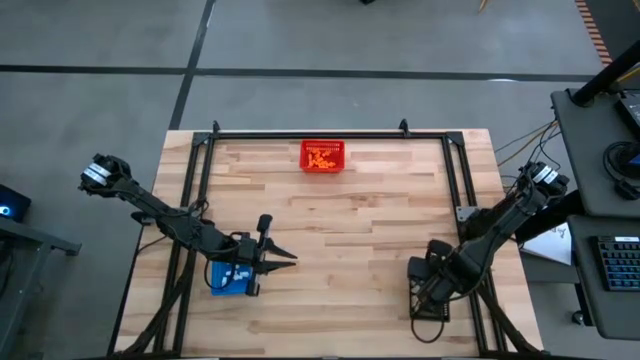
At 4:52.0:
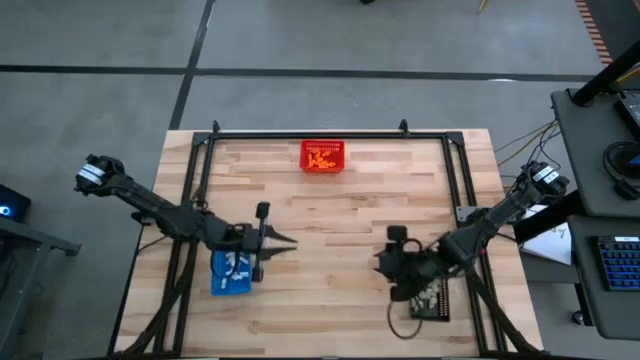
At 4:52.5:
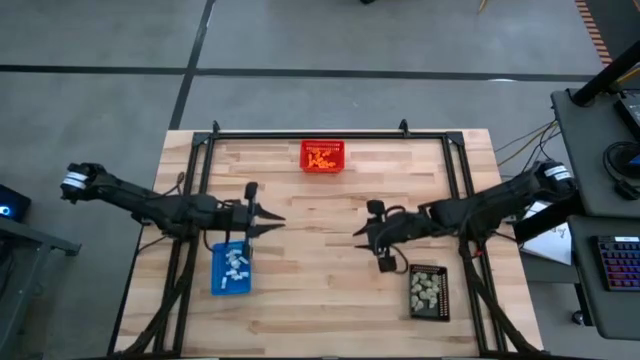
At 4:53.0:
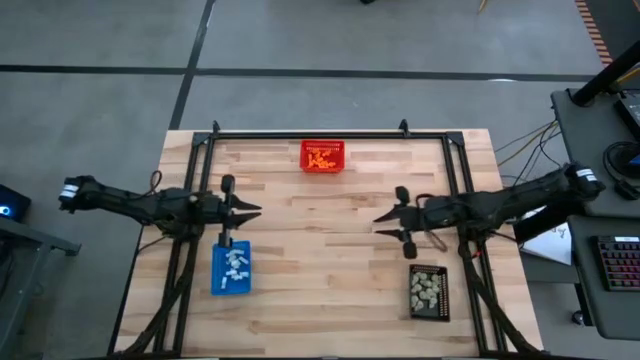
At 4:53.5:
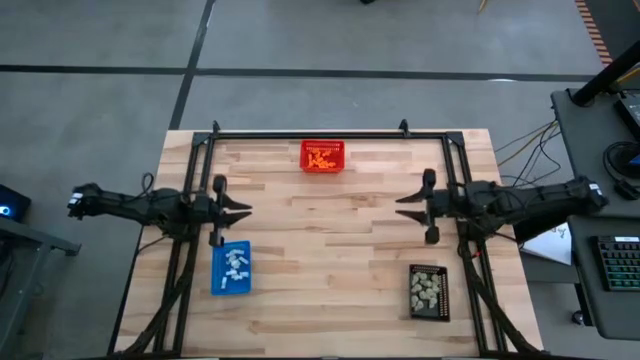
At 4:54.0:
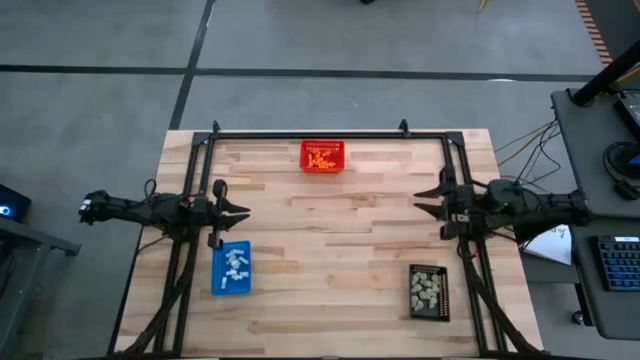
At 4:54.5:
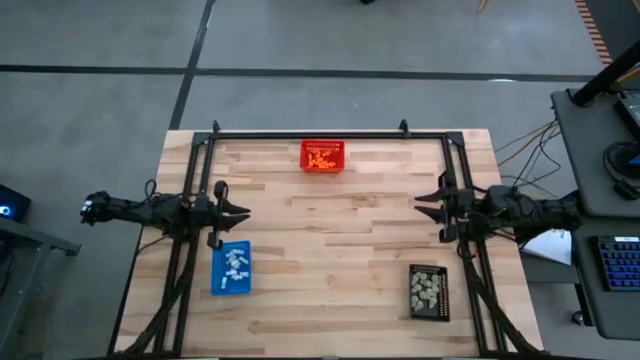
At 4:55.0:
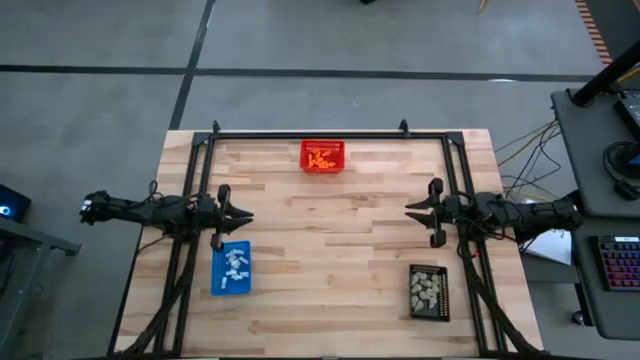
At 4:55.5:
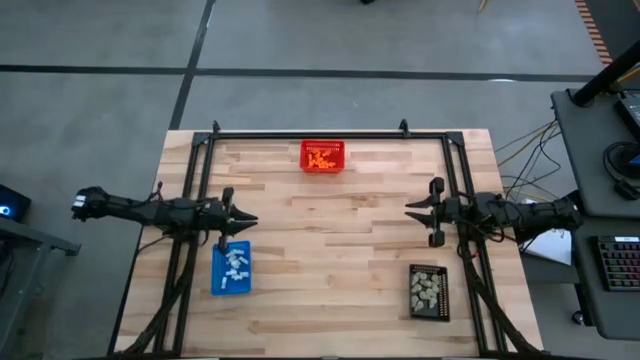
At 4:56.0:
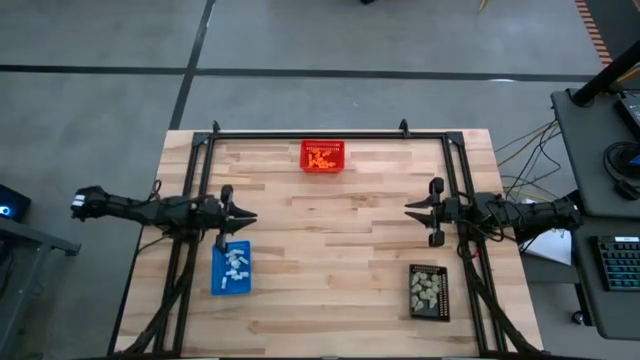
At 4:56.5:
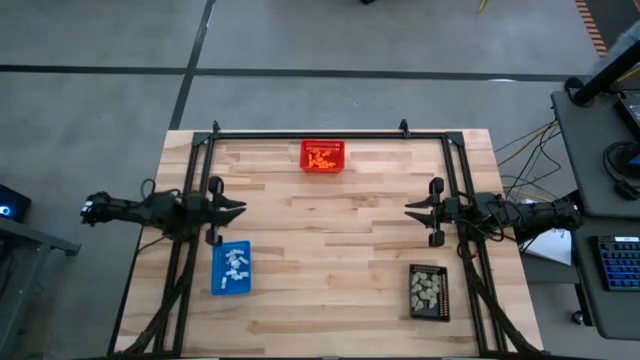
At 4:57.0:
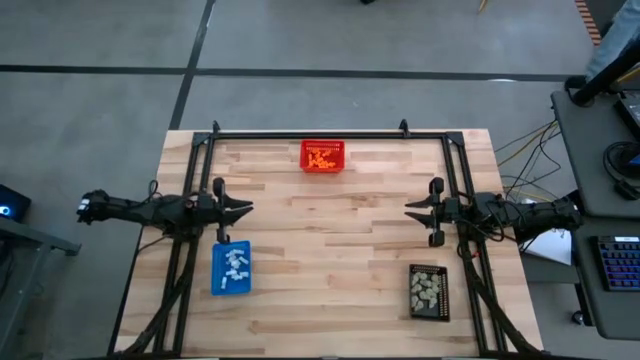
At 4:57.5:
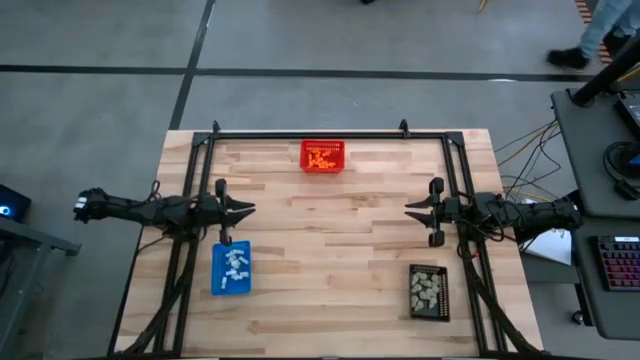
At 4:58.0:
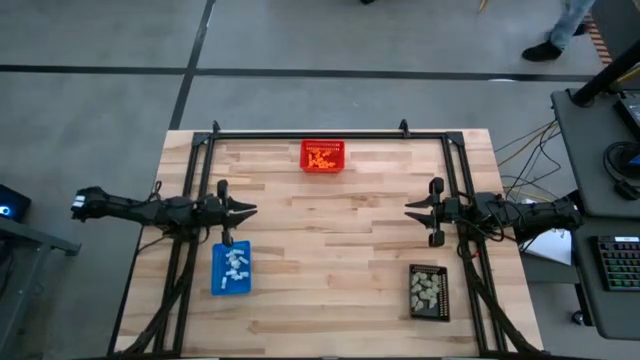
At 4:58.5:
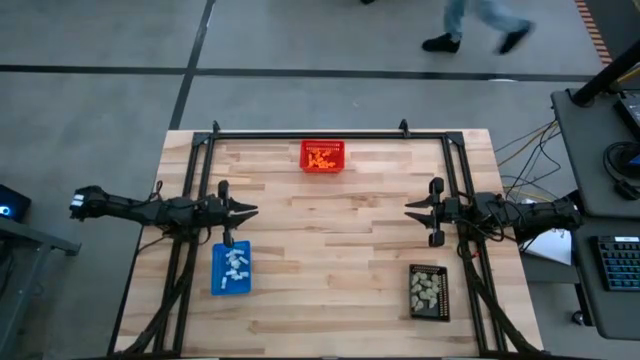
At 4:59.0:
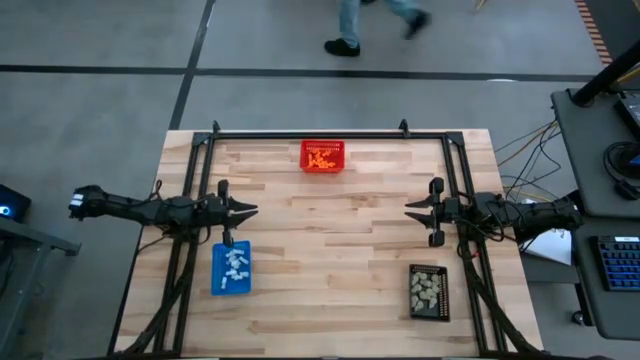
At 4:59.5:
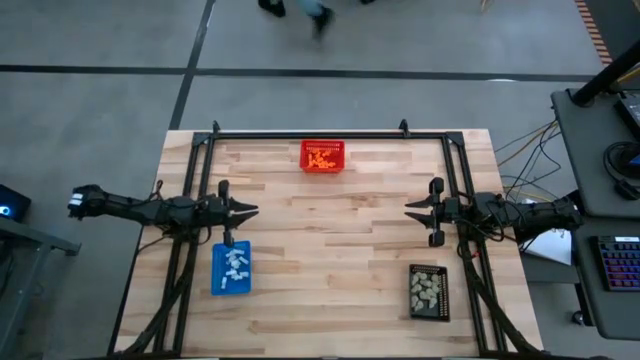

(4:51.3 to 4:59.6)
Task: Sort Halloween decoration
Return to Home Position

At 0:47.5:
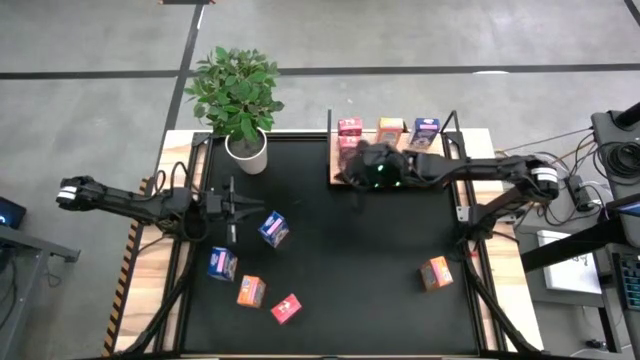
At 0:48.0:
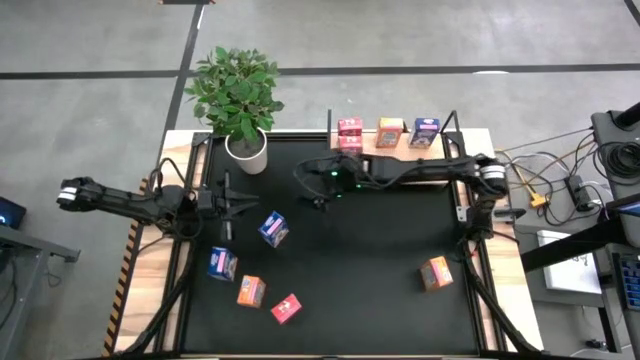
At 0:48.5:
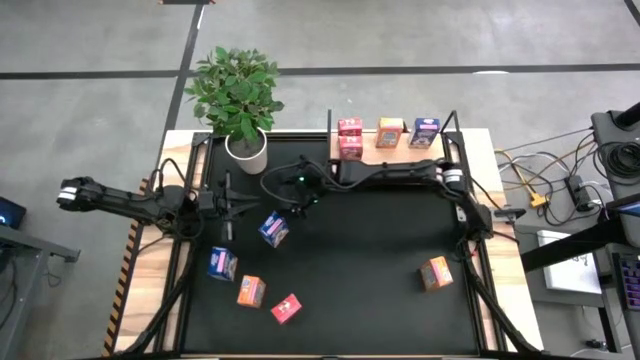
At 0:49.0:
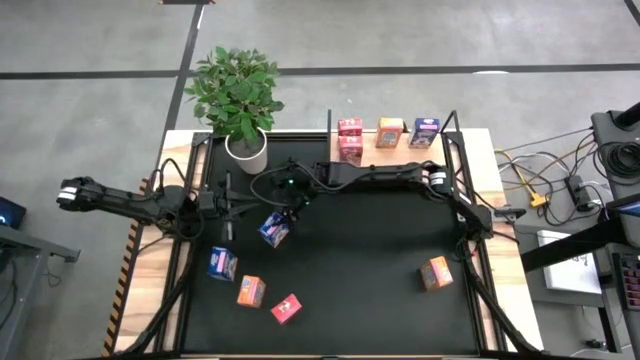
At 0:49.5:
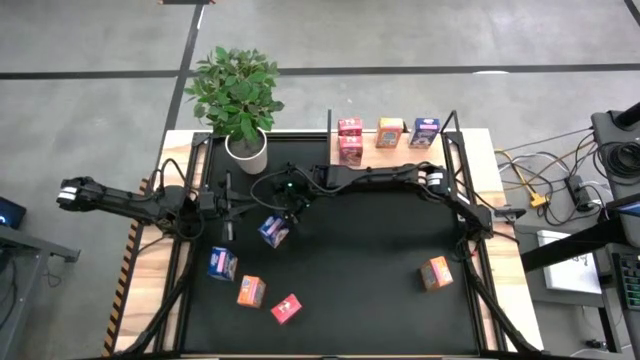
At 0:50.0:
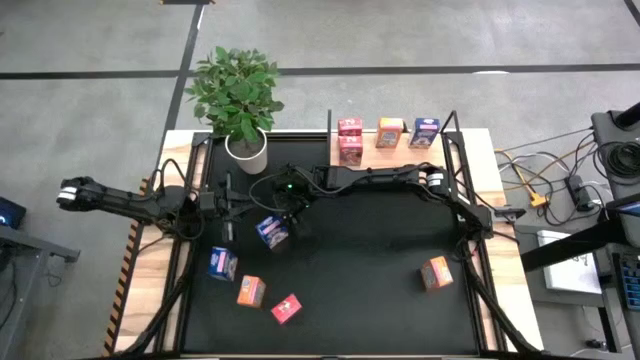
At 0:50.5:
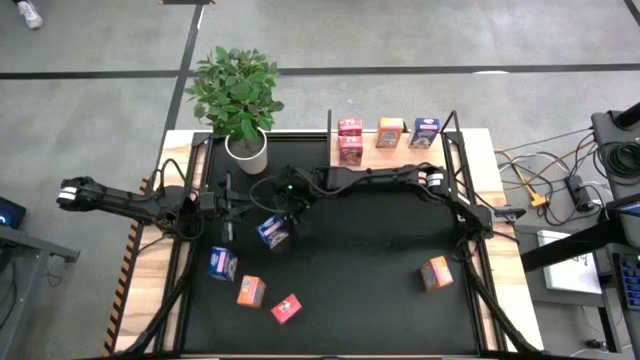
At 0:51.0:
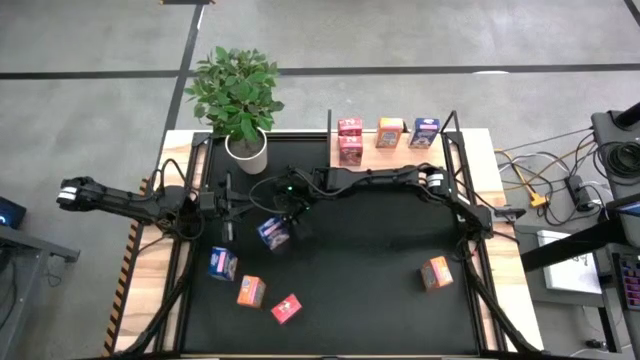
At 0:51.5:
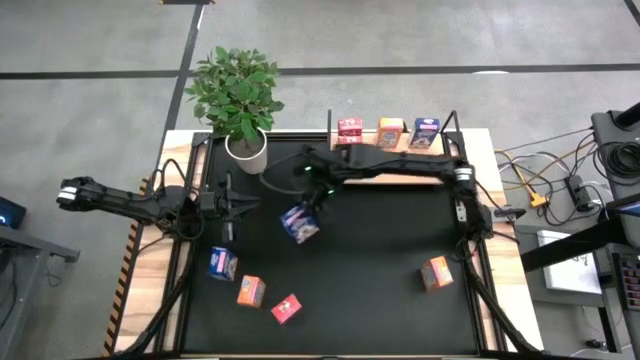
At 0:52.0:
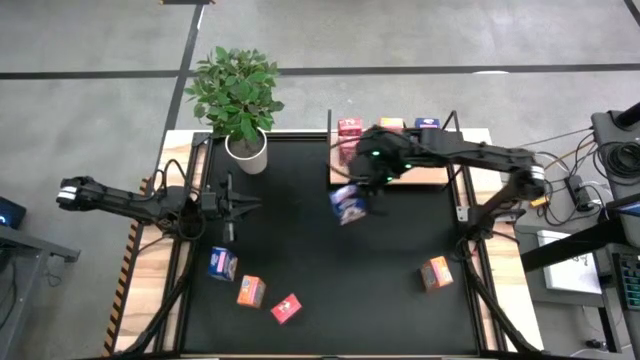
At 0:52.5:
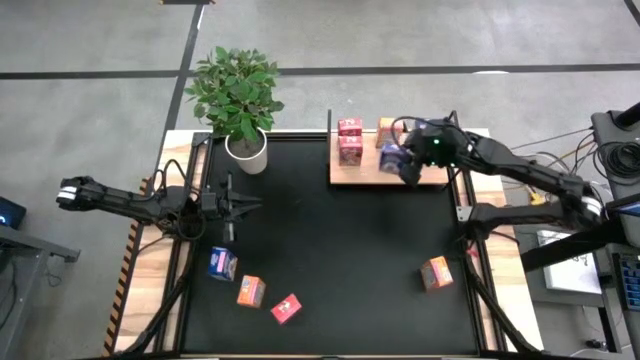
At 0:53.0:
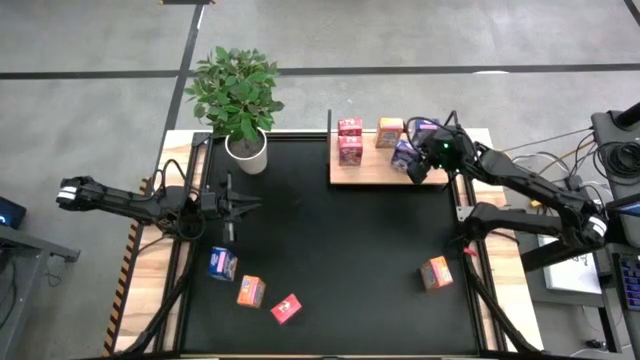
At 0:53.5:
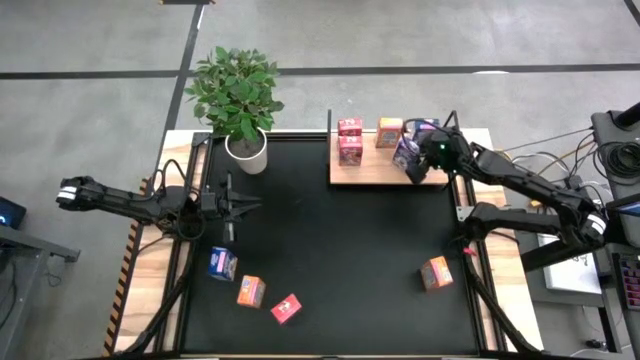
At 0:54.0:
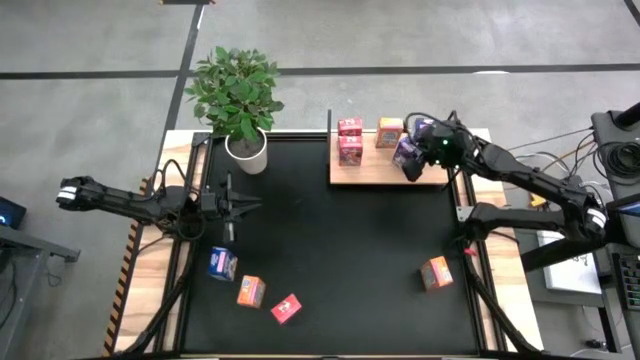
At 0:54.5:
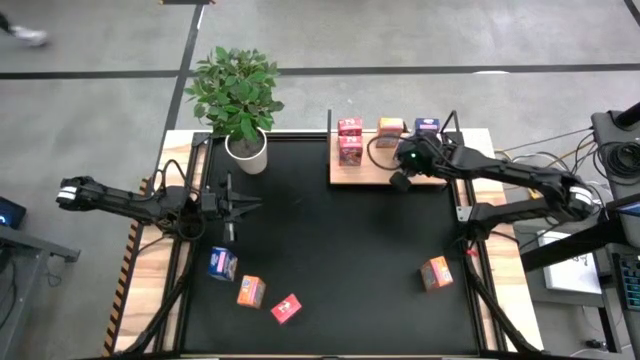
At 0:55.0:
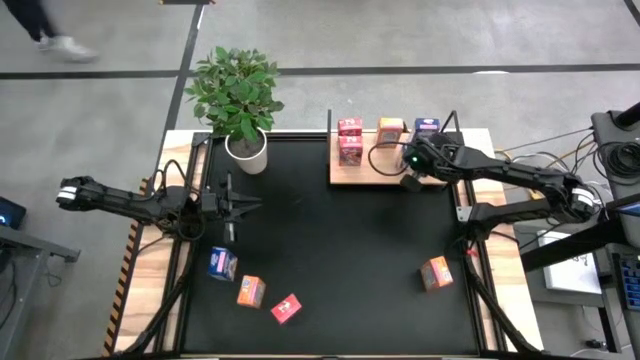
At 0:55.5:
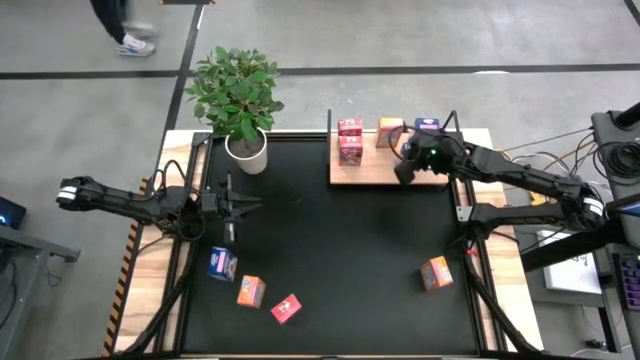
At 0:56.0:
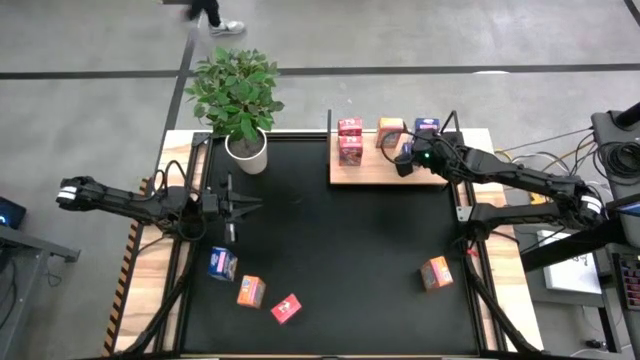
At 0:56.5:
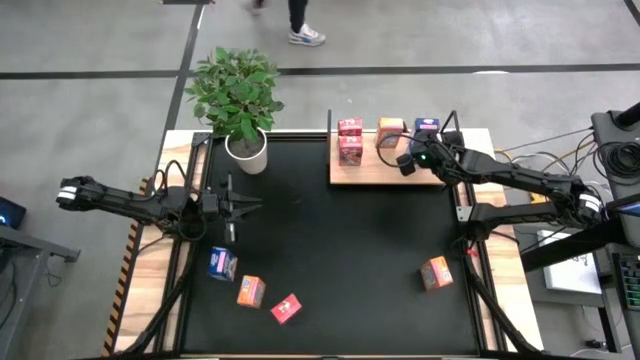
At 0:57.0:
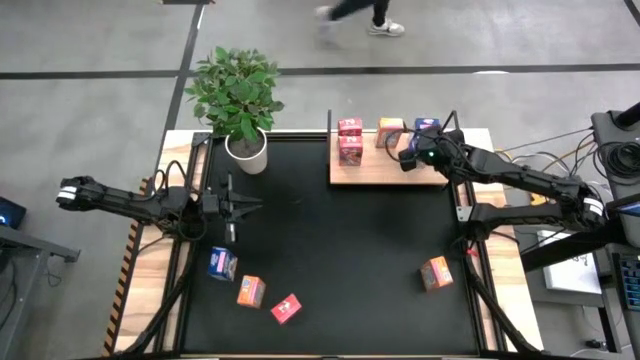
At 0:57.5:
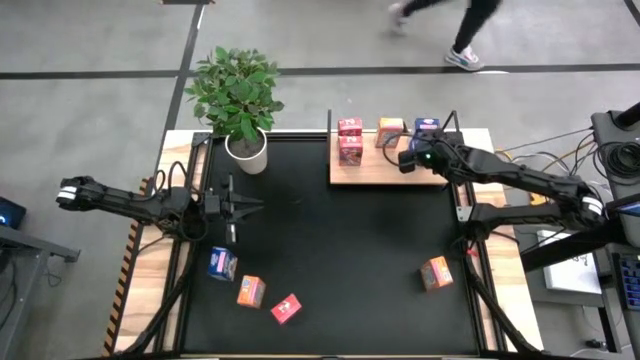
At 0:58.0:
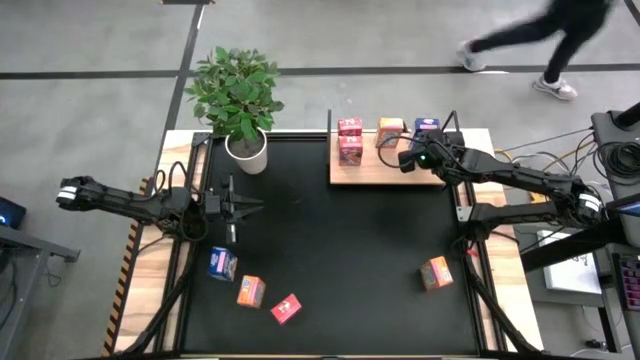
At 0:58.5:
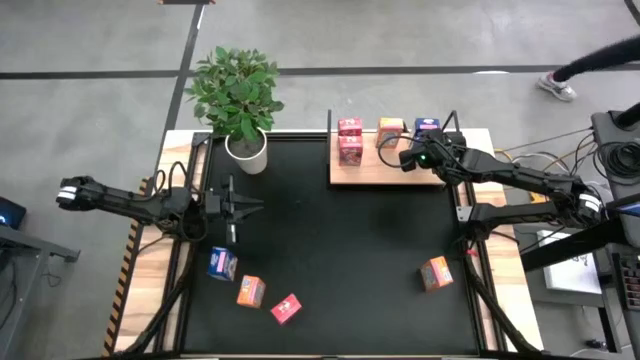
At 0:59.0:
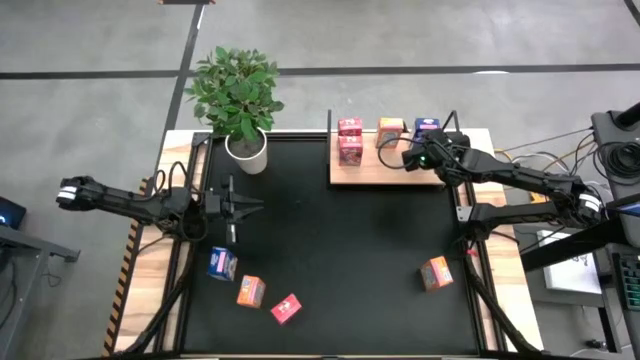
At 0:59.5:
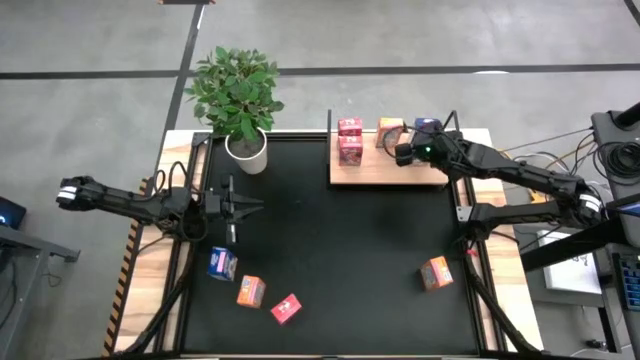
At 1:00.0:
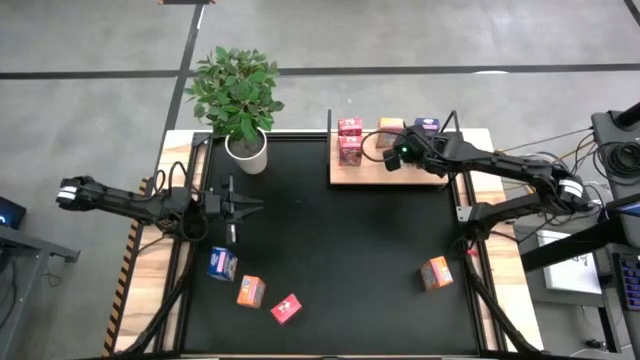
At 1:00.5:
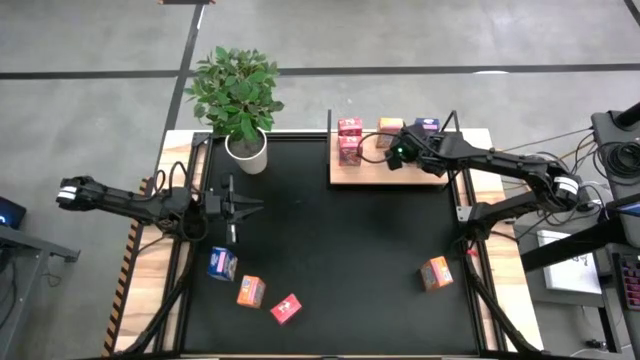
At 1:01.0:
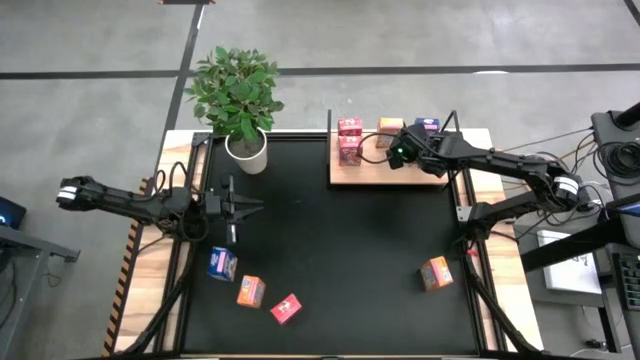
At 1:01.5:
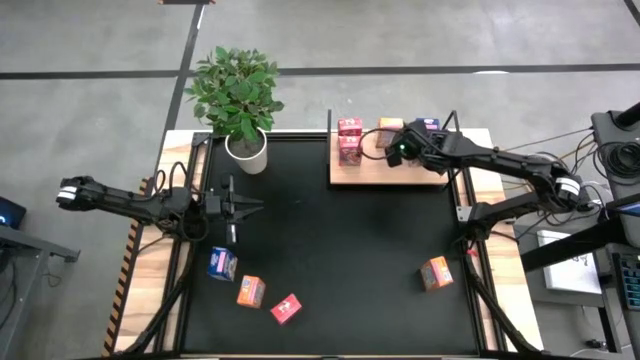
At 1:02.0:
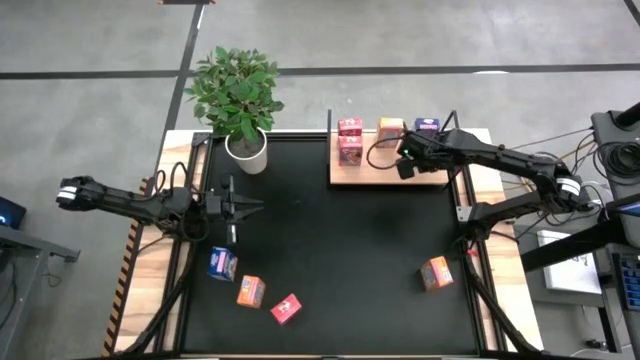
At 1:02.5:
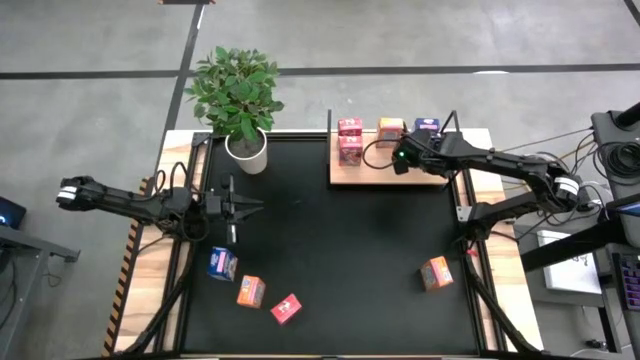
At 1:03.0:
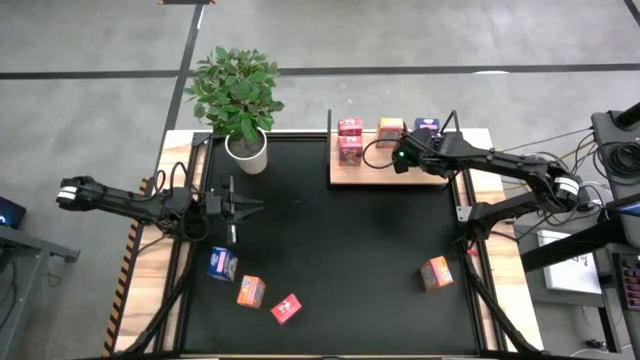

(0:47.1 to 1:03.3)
Task: Stack cereal on shelf
Put the top blue cereal box on the shelf aligned with the other blue cereal box
